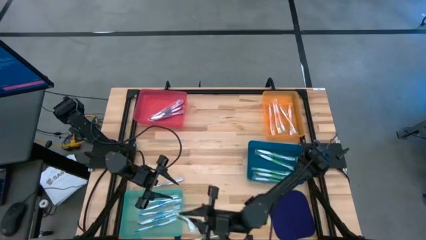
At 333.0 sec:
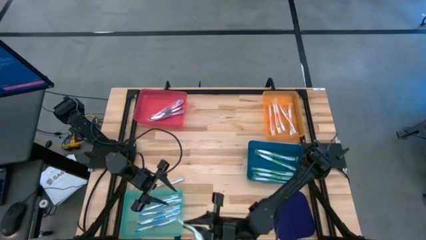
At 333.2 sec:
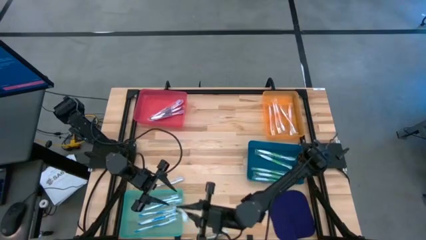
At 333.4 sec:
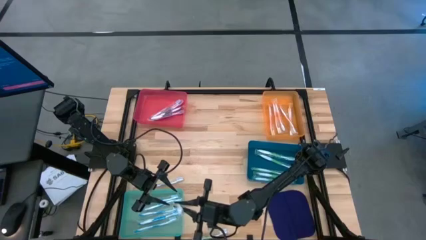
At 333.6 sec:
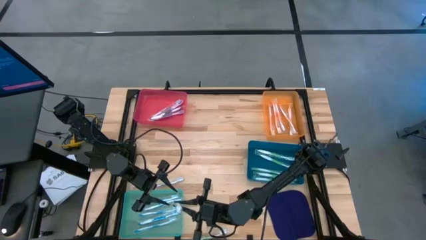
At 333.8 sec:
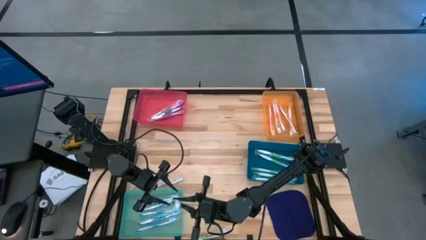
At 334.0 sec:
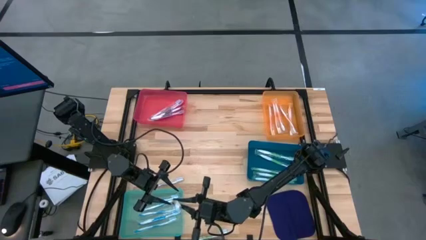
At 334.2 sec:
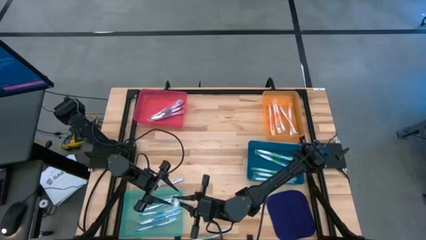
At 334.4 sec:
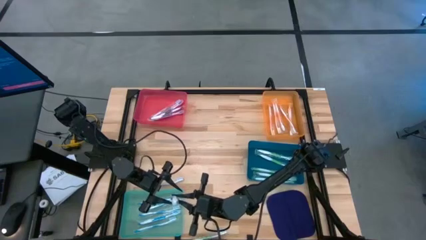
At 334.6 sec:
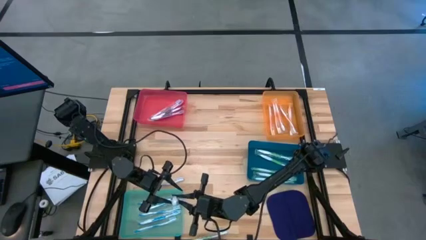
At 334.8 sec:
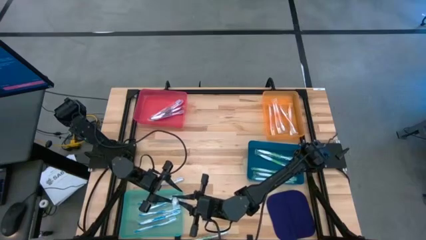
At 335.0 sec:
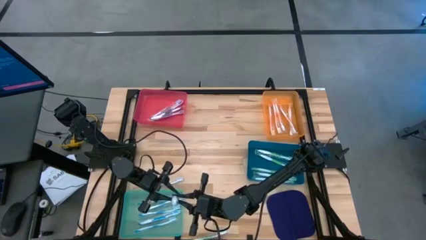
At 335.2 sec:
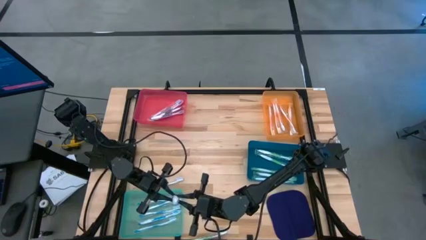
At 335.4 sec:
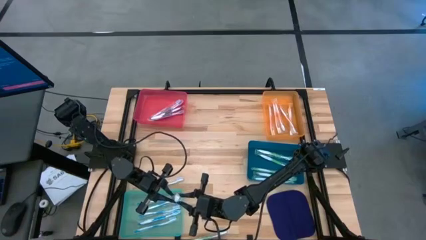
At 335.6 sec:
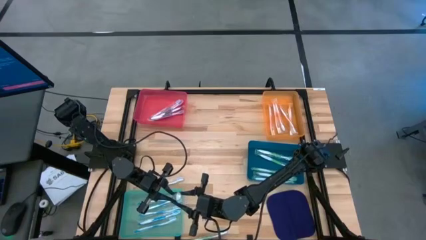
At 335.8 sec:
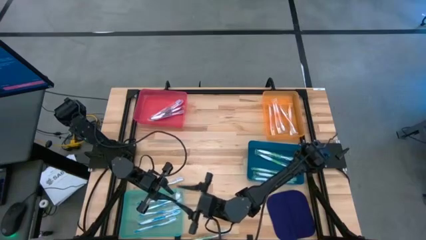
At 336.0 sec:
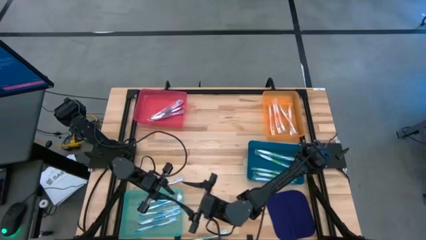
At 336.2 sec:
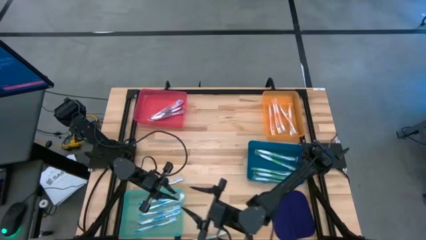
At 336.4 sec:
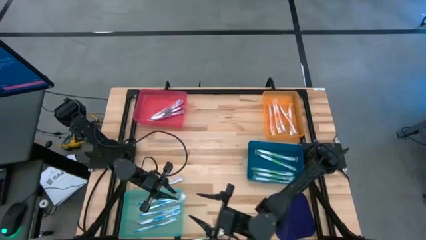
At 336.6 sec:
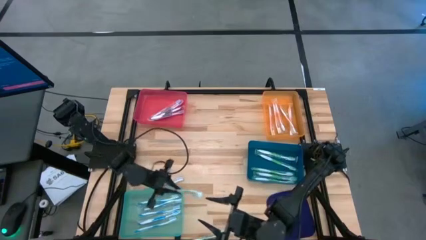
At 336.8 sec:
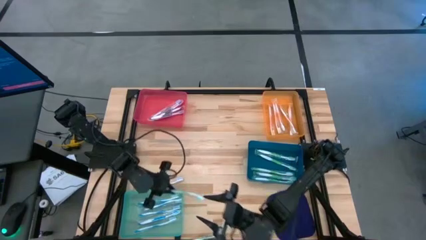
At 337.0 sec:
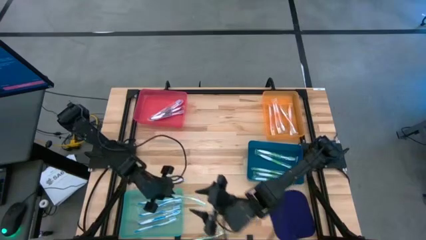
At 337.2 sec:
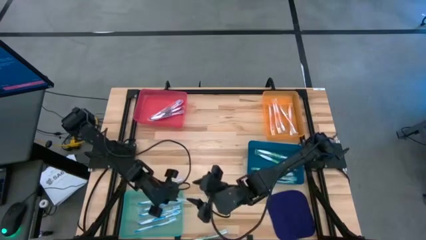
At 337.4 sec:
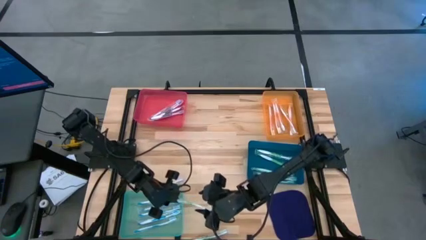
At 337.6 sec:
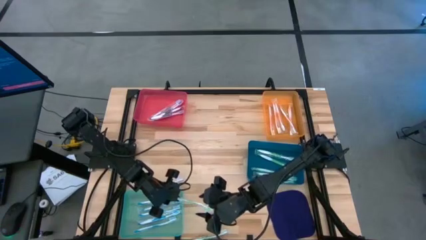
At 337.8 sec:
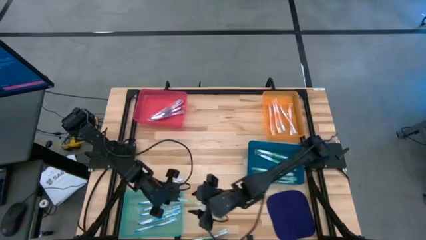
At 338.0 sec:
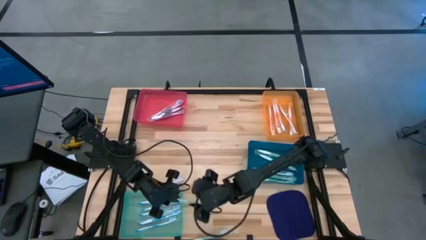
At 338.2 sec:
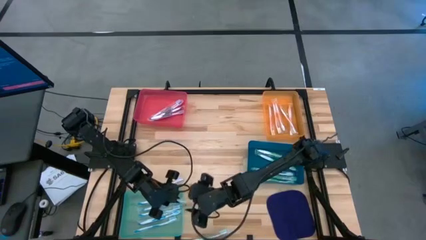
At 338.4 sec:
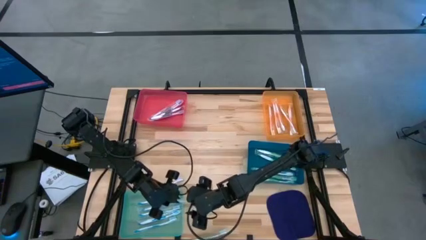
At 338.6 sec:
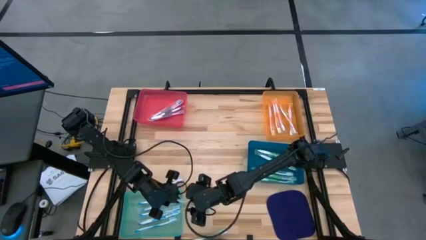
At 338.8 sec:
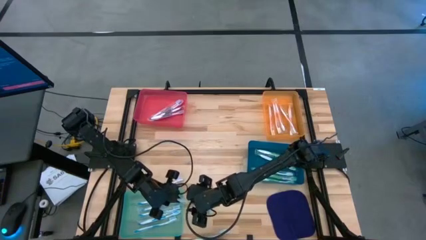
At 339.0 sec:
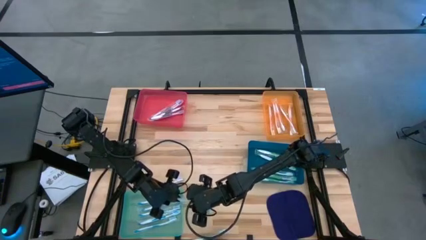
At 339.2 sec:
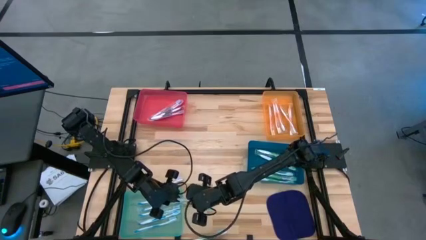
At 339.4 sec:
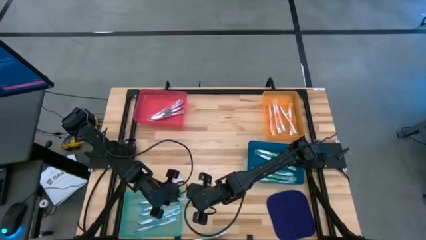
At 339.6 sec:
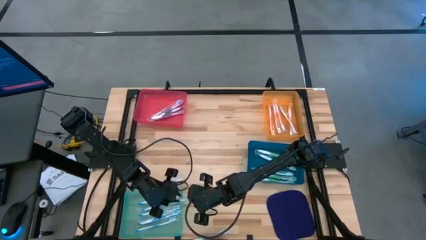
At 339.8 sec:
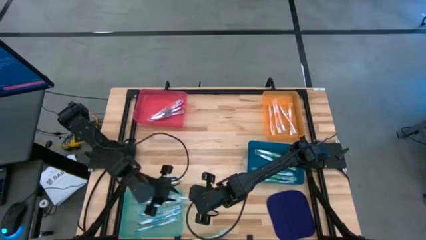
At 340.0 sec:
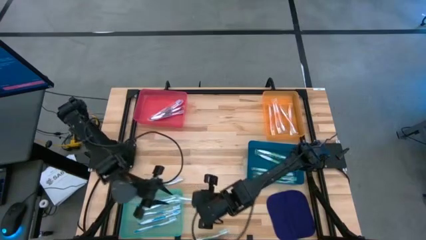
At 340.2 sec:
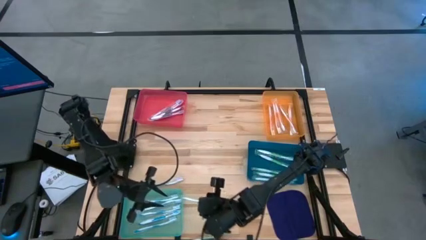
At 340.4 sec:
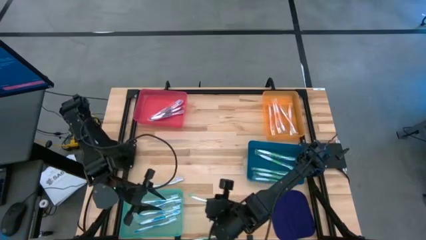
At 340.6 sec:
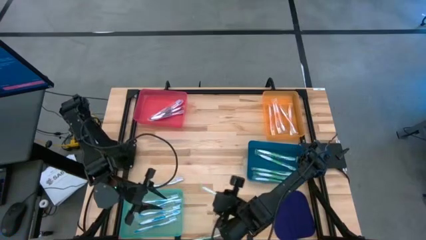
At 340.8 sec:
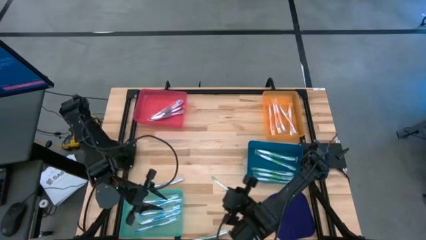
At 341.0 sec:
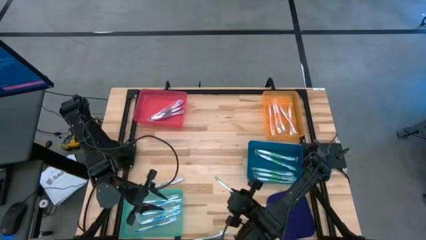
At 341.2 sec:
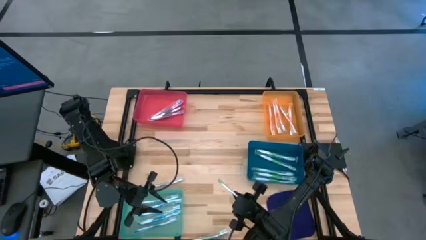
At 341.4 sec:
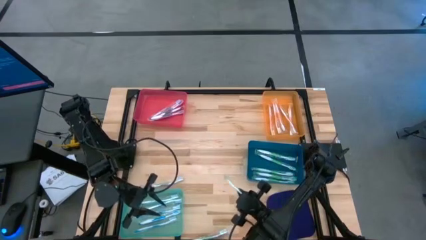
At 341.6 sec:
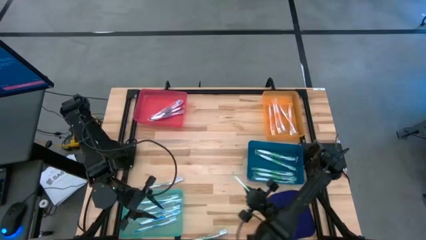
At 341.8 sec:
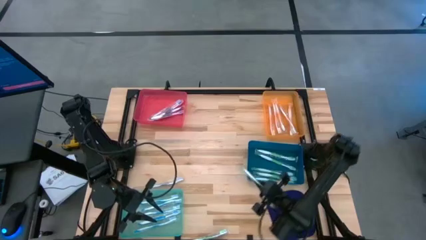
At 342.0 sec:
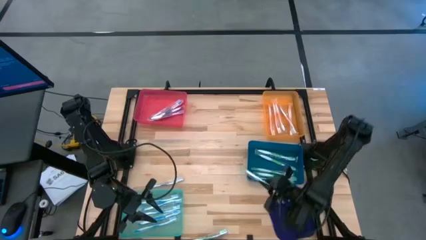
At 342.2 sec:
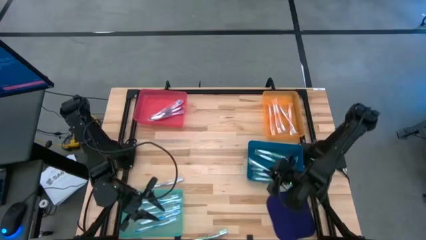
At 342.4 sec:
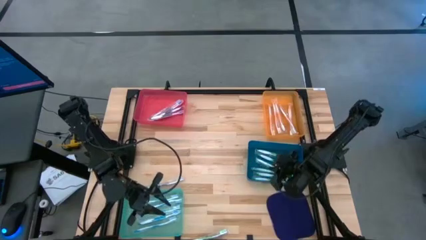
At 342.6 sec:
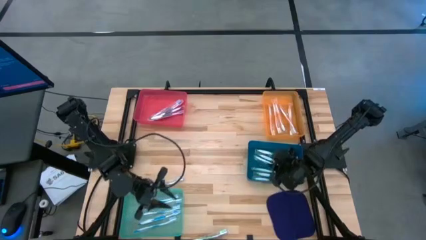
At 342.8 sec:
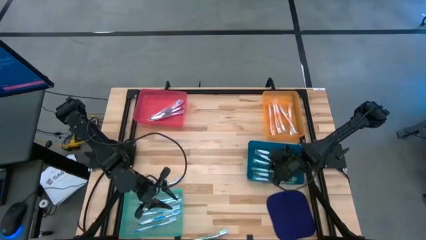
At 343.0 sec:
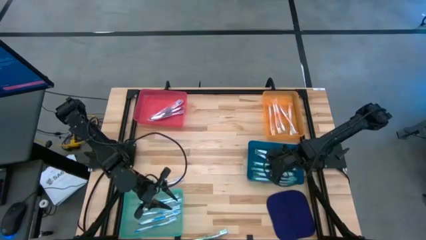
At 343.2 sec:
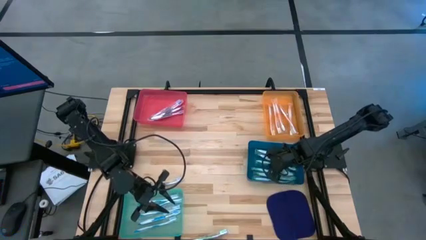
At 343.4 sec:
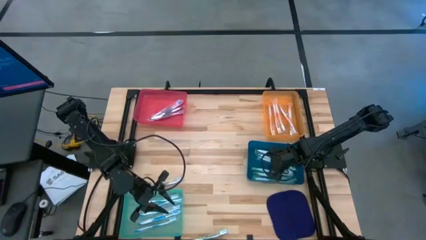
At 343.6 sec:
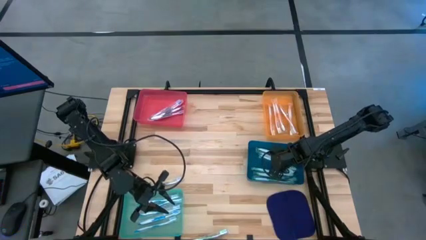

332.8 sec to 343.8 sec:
Task: Pick & Place Toothbrushes
Put the green toothbrush into the blue bin
